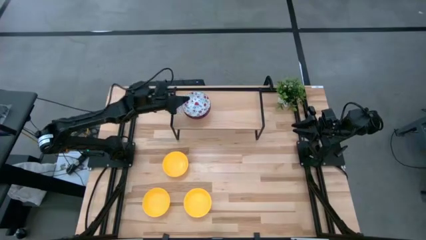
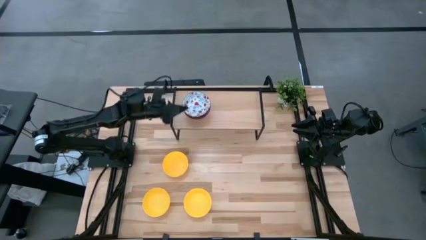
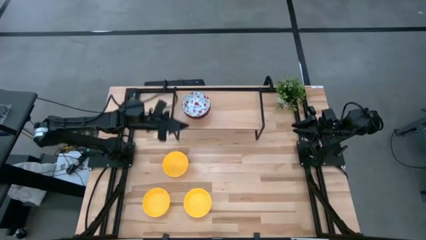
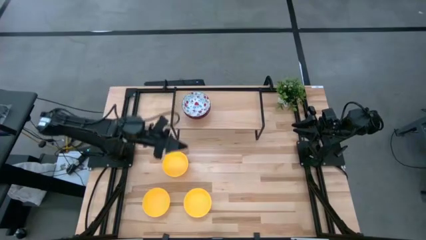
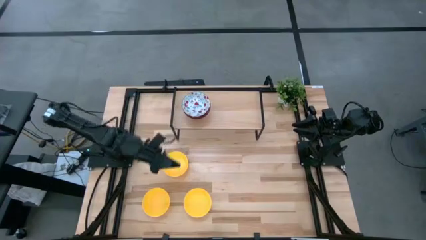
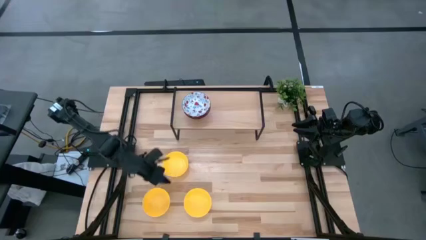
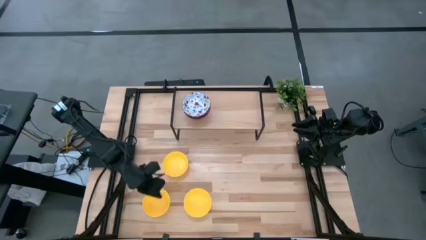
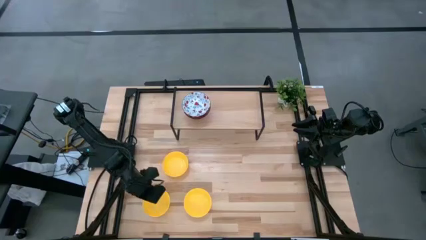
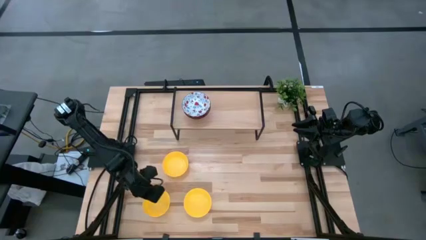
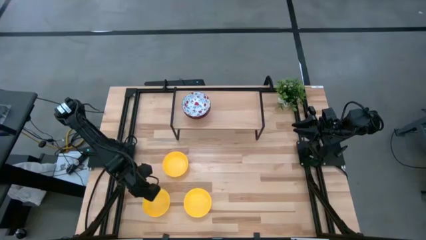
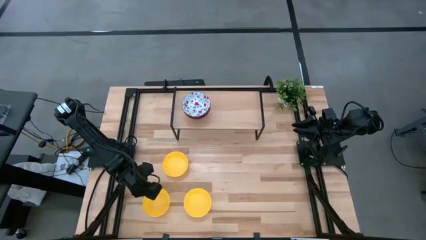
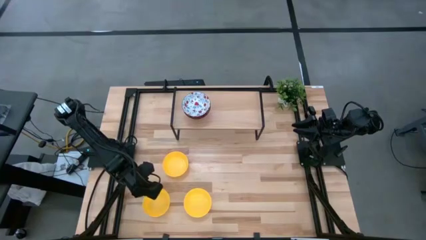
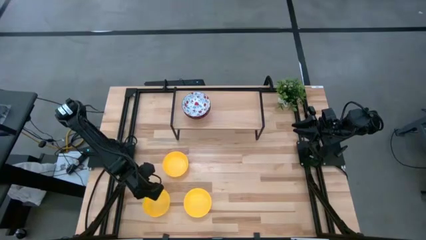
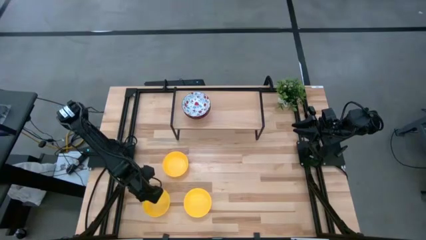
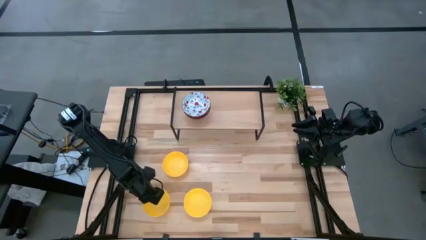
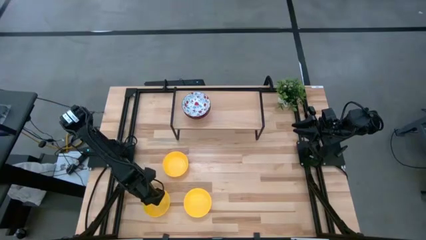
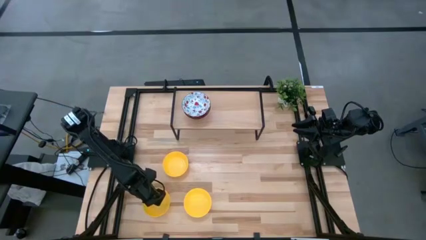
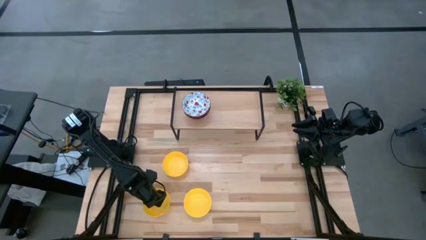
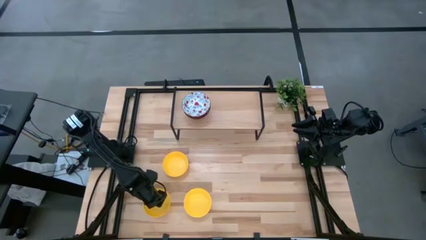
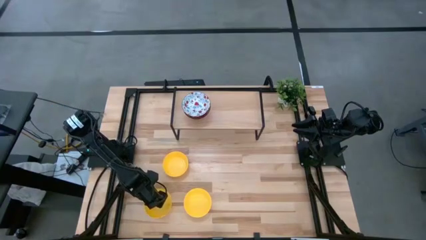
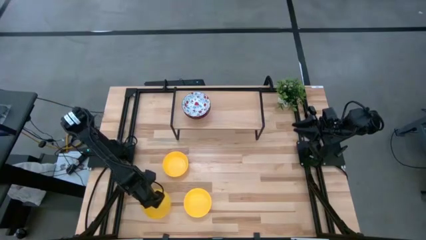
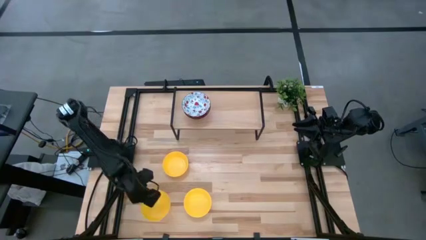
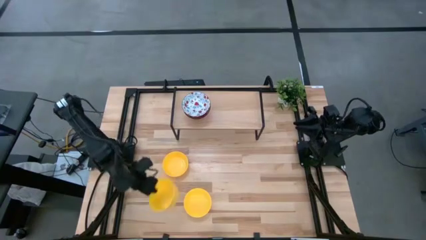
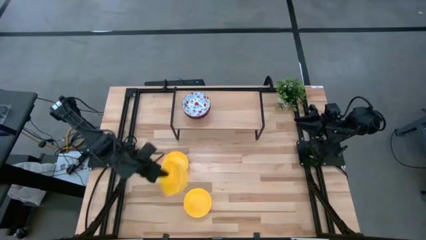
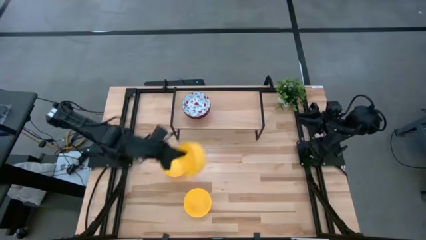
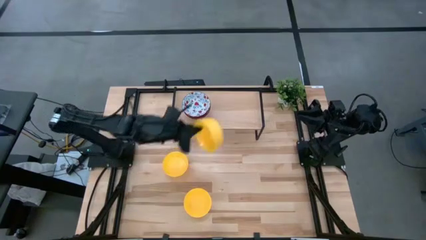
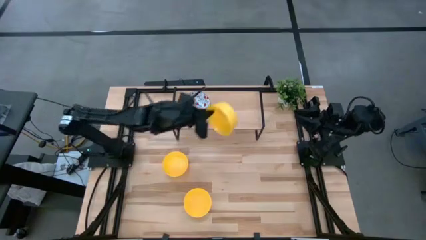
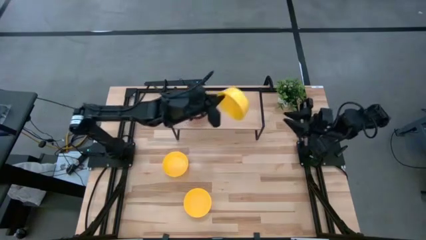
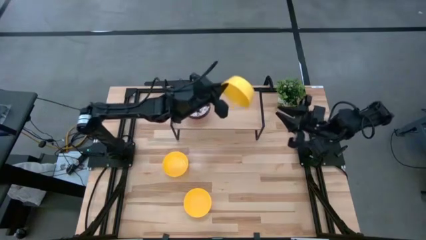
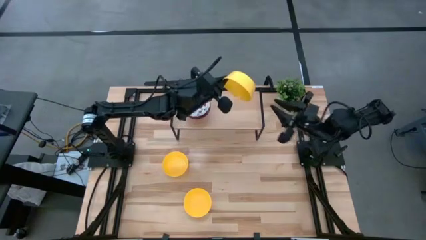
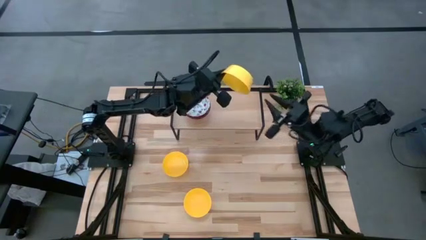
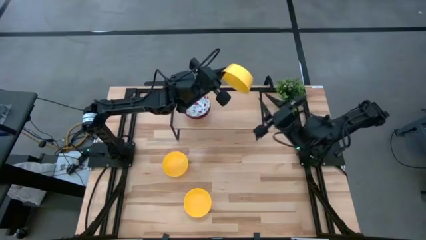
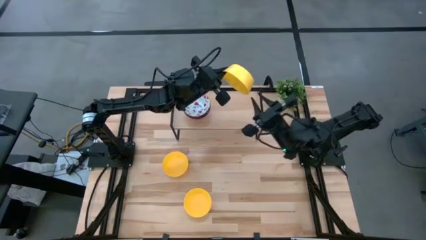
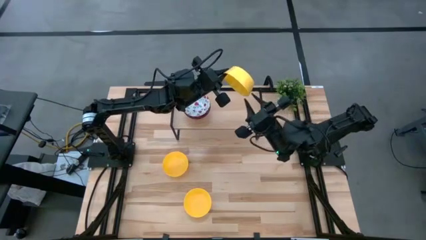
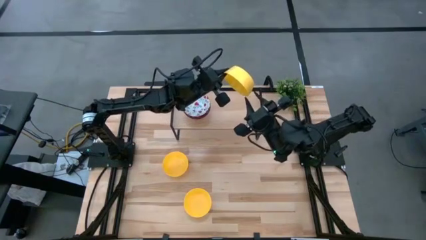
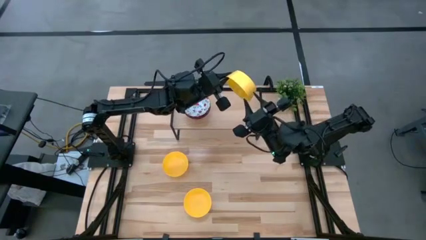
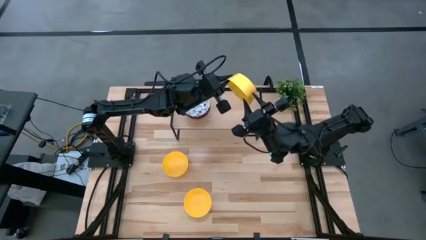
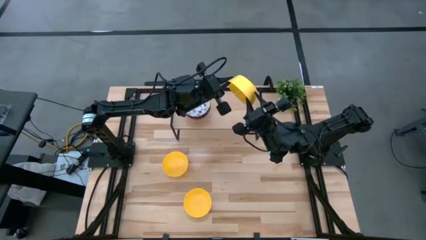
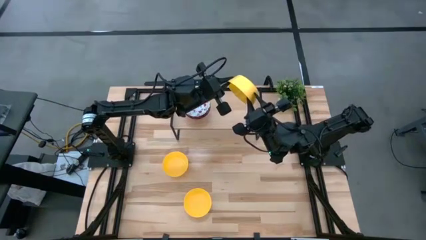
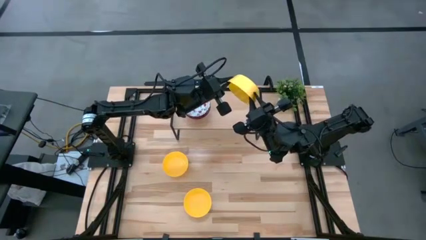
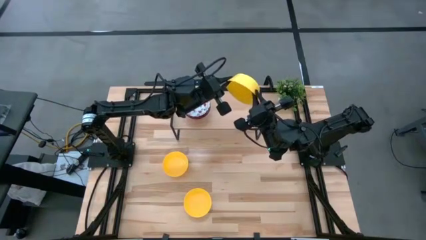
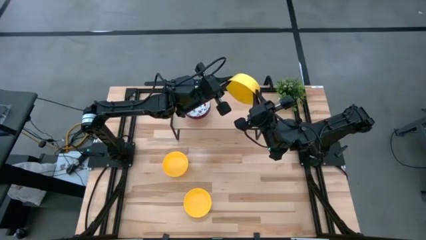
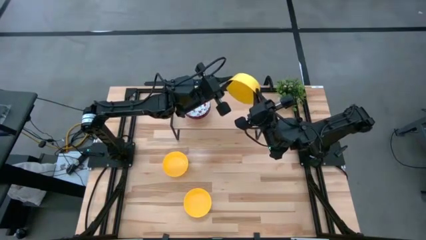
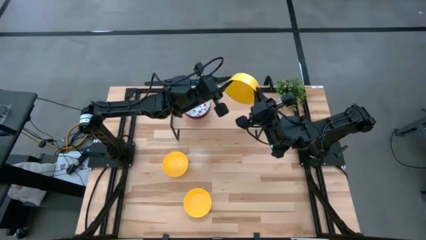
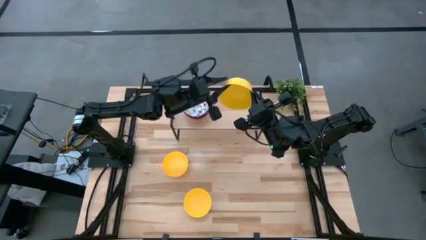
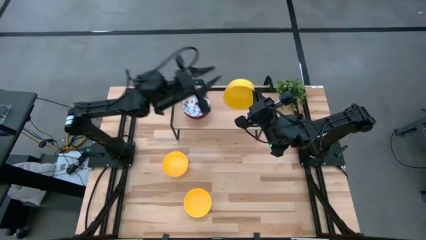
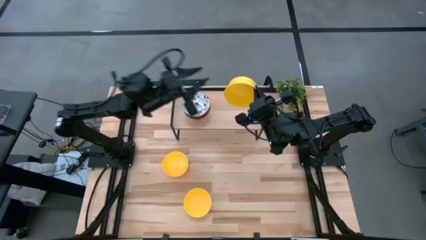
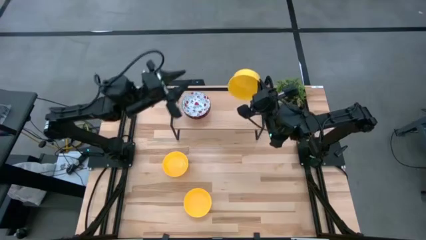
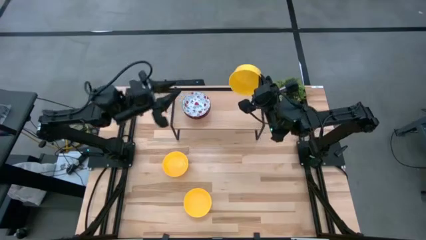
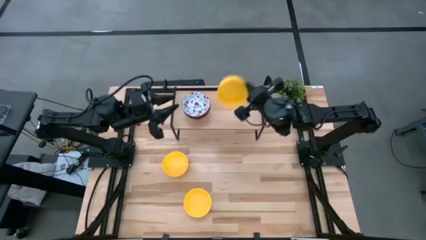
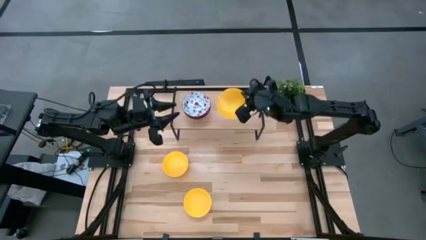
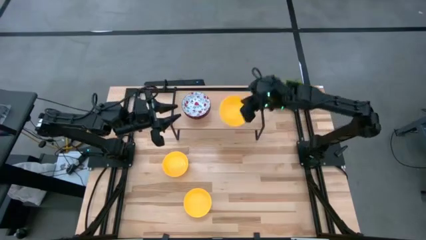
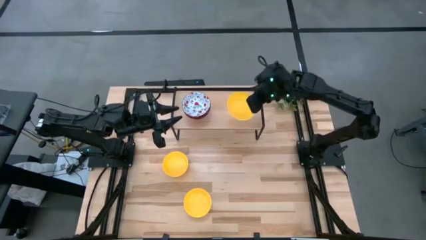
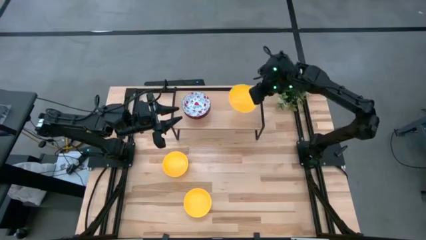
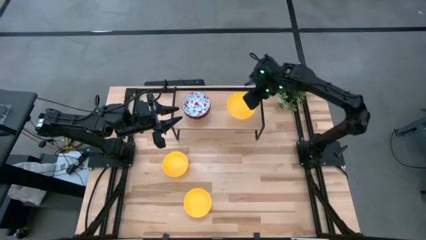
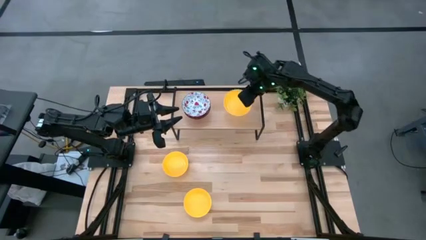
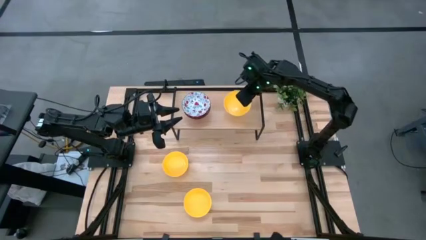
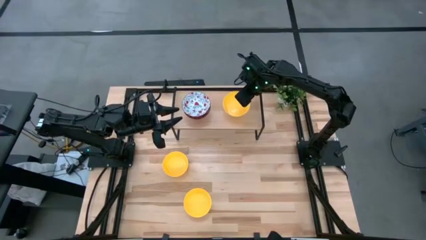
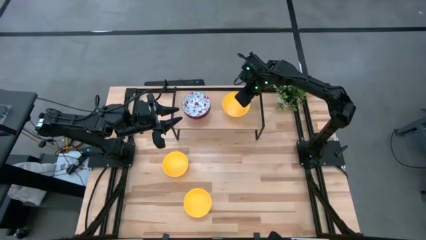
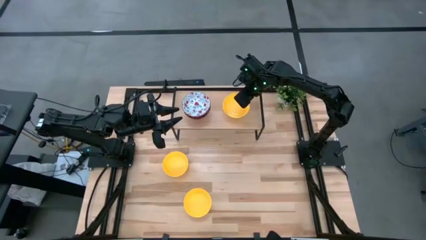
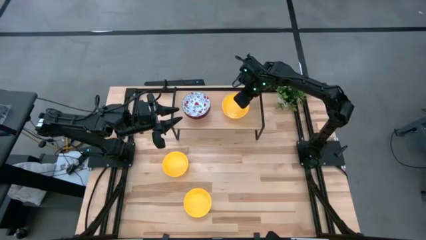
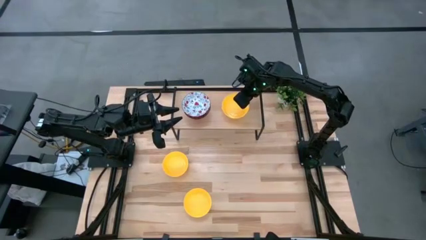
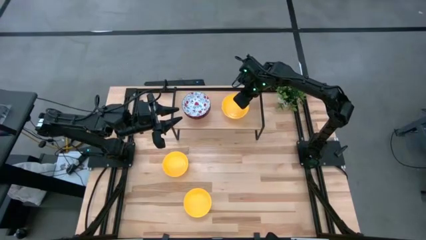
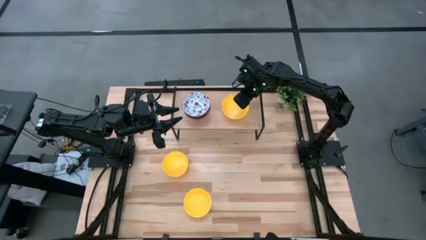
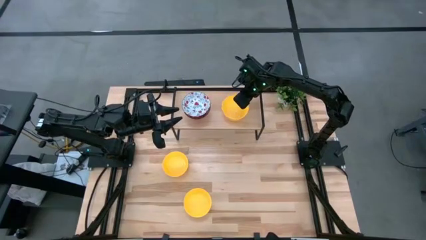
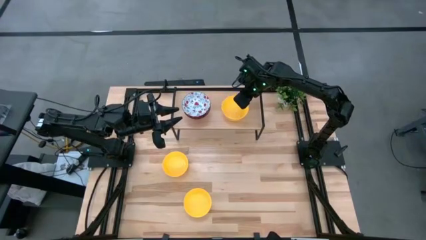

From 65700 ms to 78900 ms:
Task: Pick & Place Mini bowls
Put the bottom left yellow bowl on the shelf
